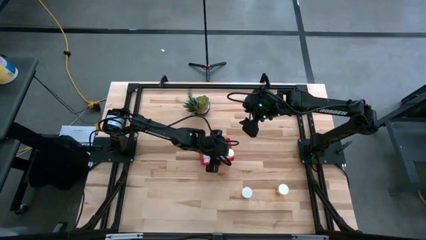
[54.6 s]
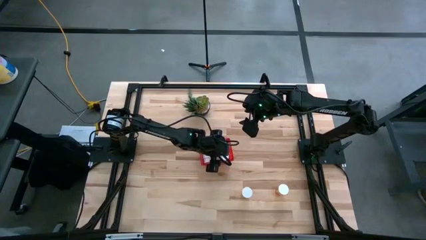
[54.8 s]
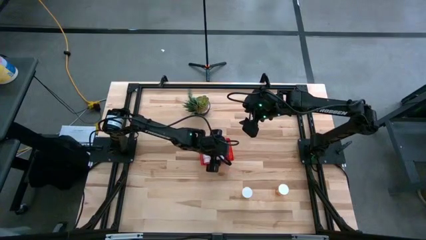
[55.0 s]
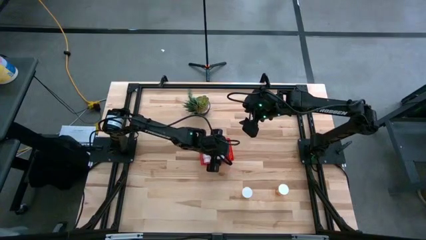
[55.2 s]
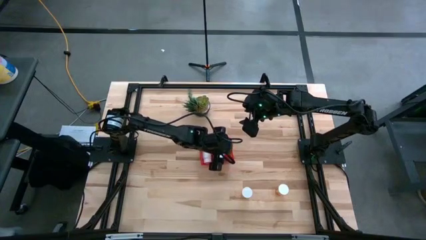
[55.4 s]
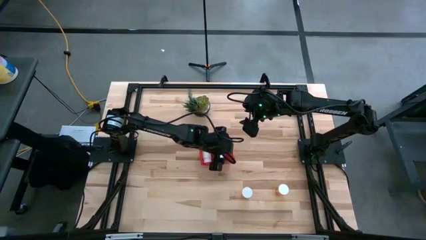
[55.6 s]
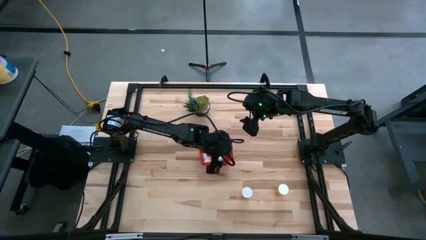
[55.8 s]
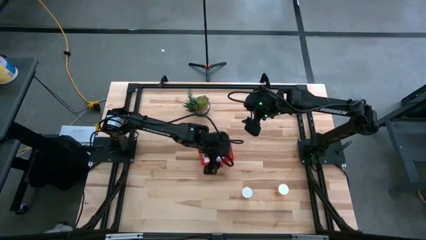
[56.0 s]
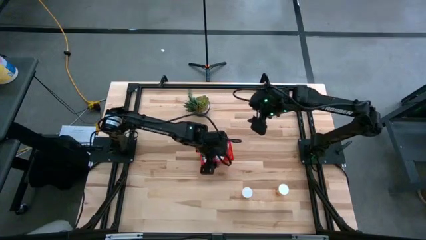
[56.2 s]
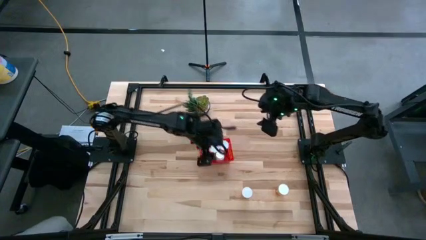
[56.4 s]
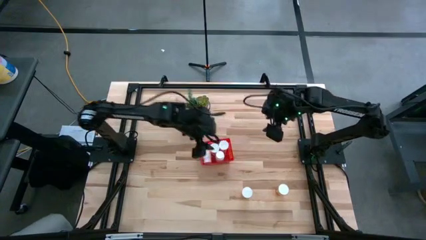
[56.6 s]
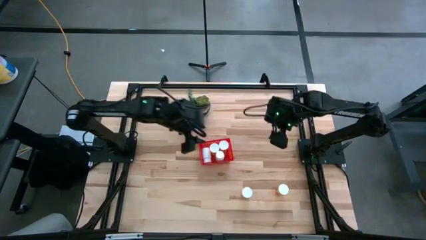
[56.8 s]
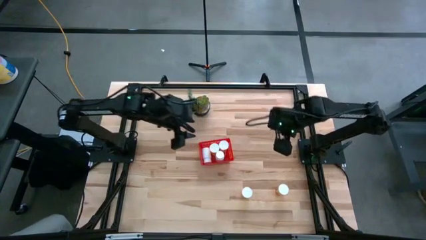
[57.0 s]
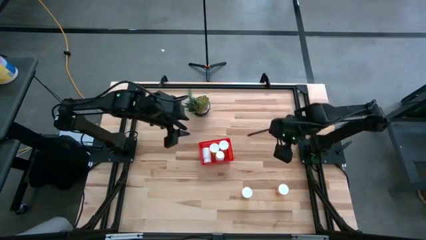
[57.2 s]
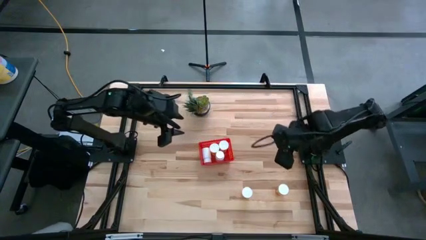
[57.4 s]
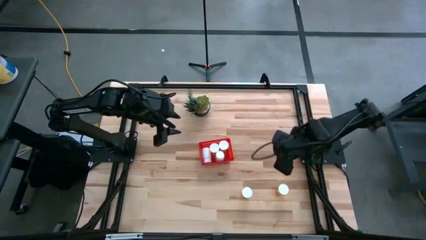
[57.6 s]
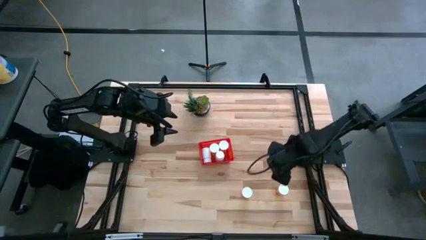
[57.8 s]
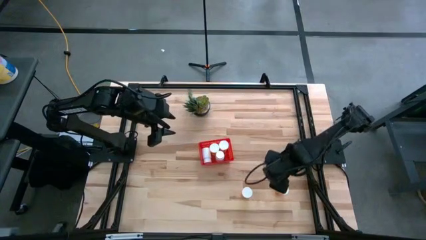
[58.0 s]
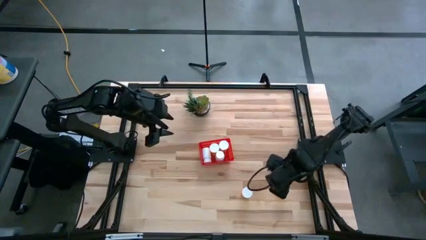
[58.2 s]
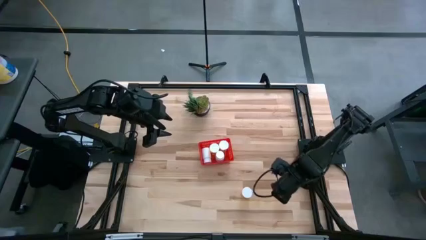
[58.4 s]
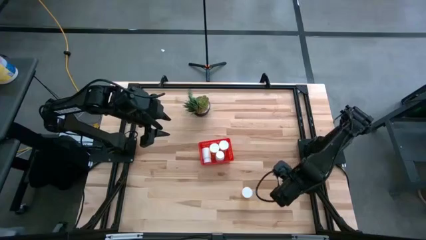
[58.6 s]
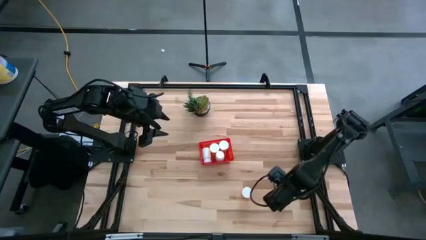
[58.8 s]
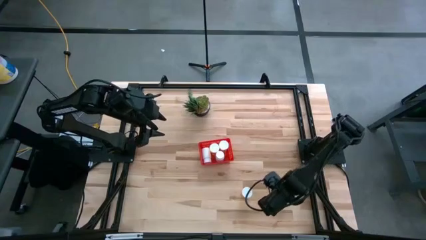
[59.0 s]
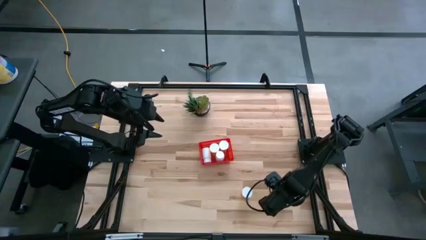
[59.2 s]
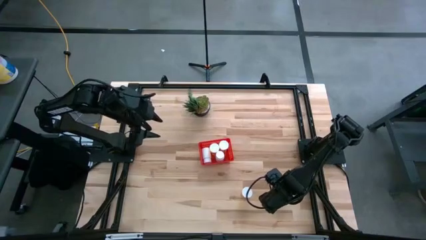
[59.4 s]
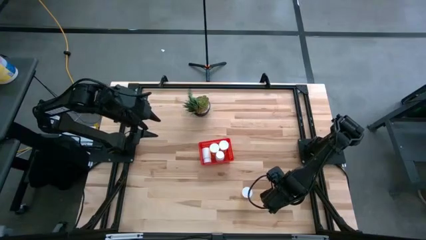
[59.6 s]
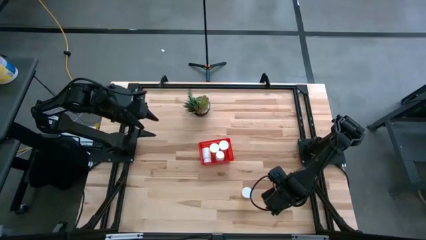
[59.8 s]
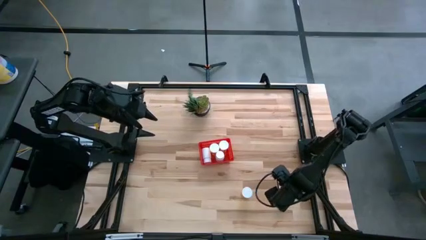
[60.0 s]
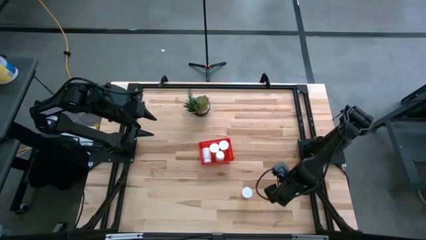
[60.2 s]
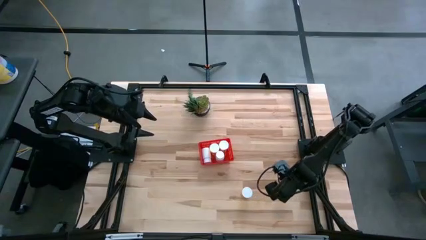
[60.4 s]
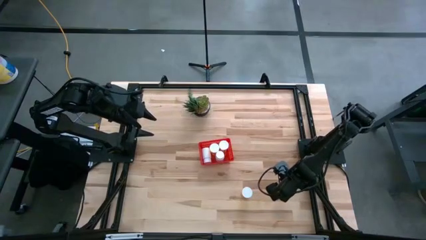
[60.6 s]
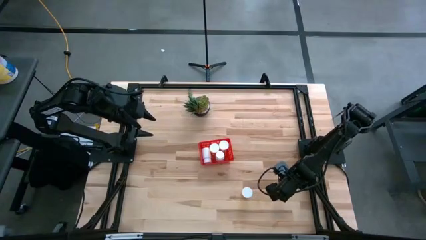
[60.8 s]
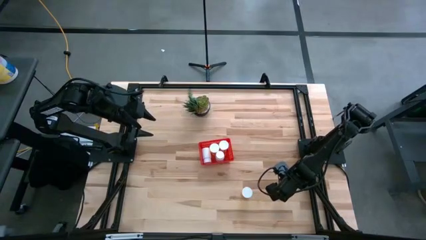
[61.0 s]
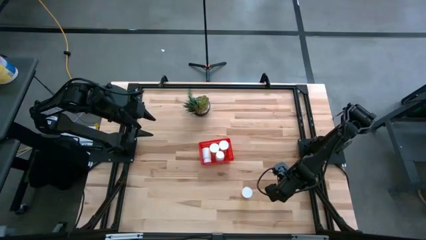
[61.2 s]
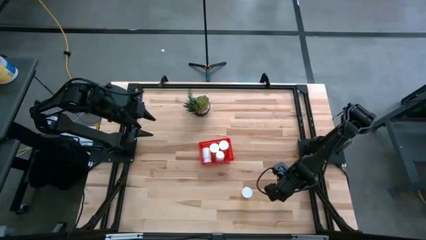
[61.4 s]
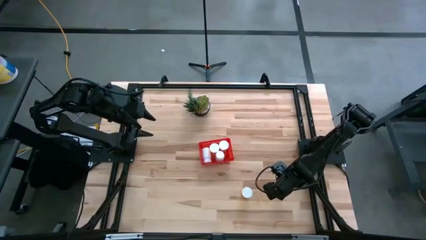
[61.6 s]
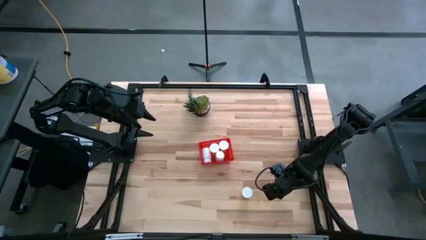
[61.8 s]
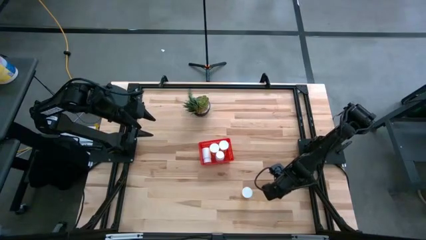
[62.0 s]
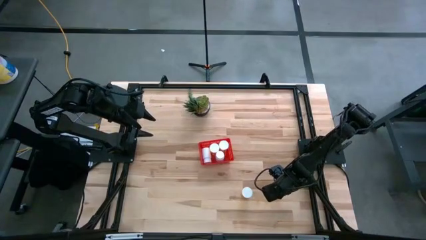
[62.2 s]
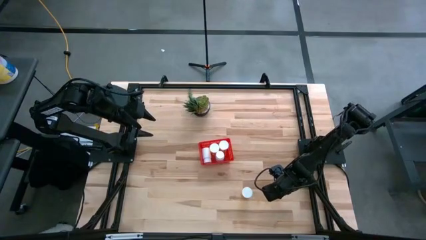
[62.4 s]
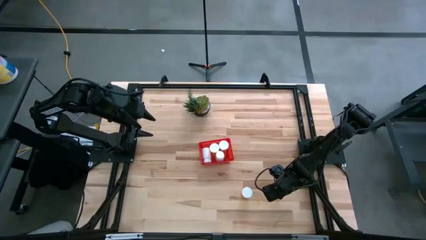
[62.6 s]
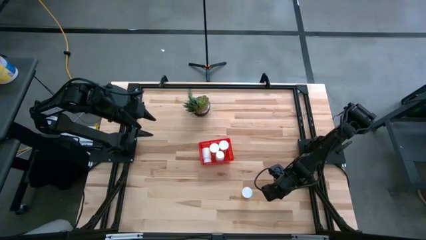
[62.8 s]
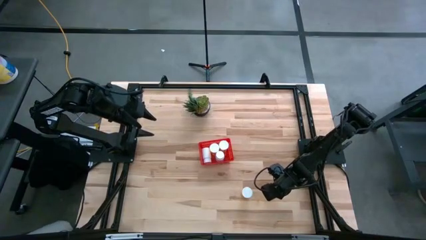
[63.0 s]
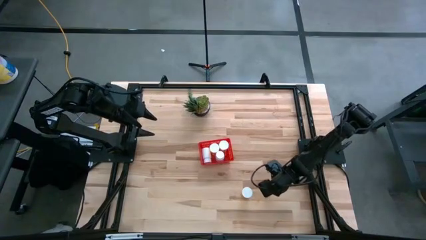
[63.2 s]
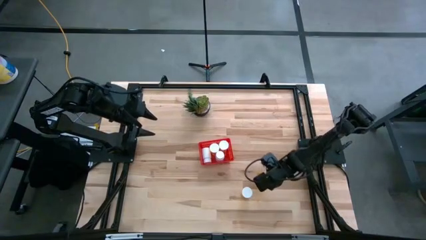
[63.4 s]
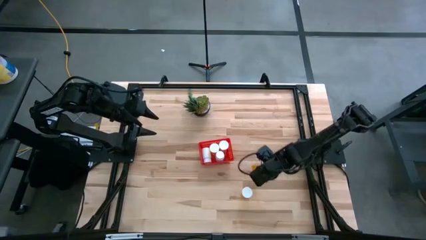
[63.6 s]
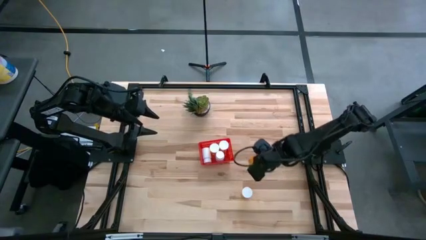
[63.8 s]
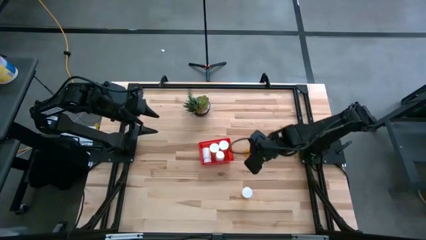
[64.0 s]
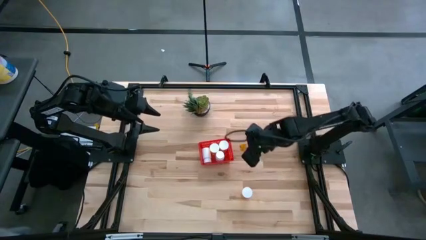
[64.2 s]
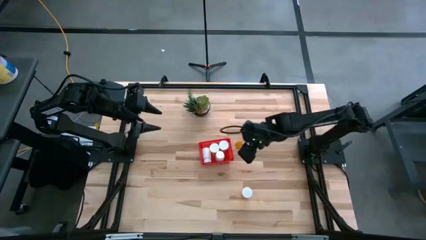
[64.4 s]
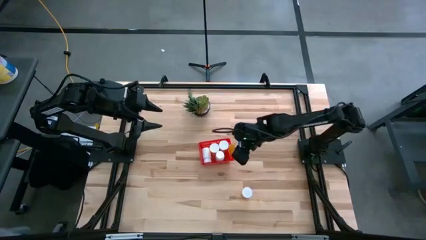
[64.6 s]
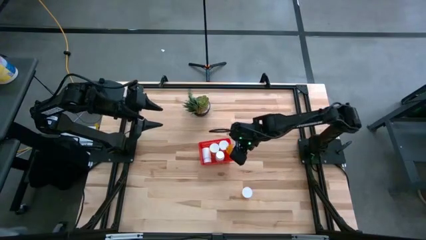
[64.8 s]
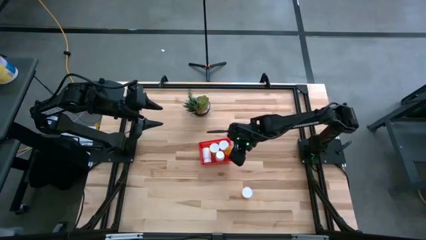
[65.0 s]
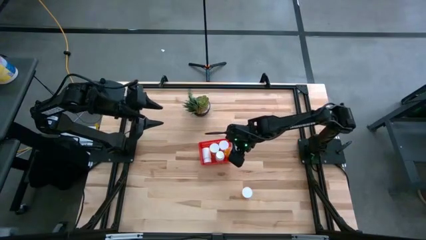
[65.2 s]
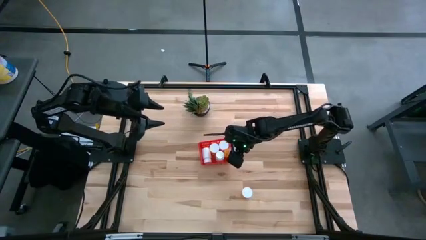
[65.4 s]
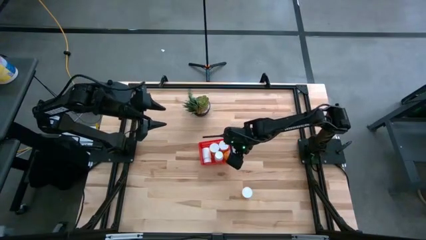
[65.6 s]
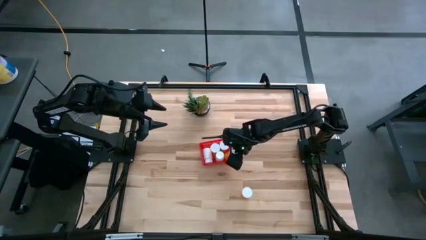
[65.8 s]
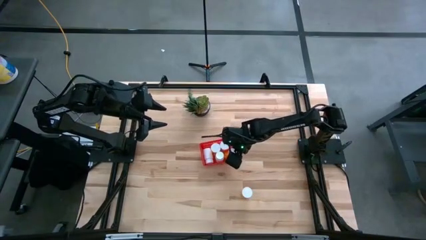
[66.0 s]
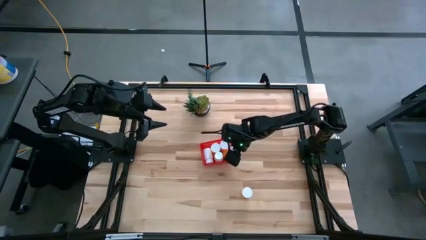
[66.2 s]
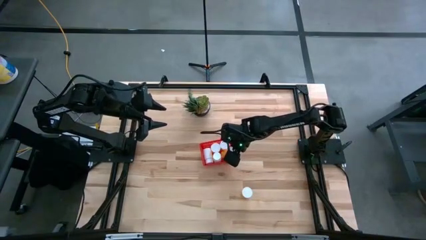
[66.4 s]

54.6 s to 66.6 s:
Task: Pick and place pill bottles into a basket
Put the orange pill bottle into the red bin

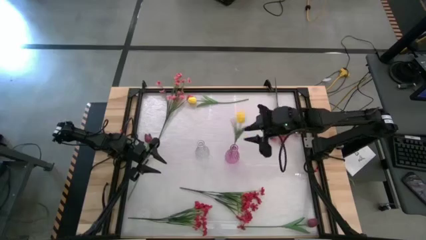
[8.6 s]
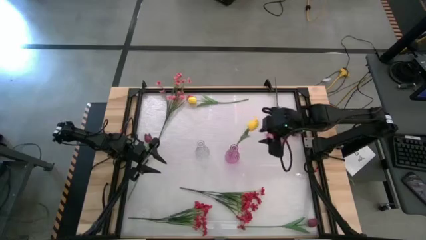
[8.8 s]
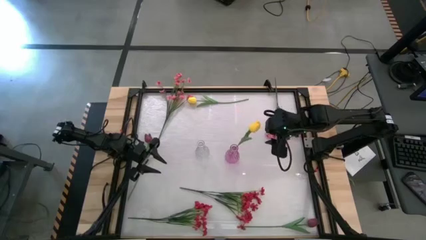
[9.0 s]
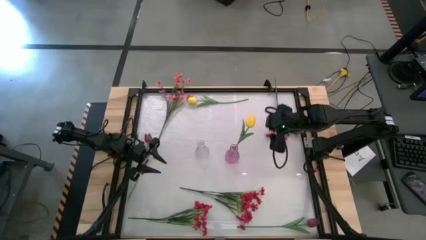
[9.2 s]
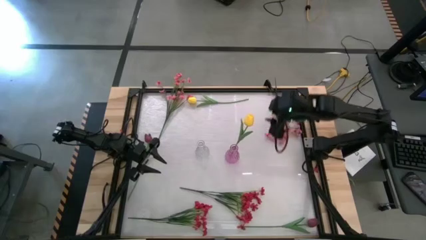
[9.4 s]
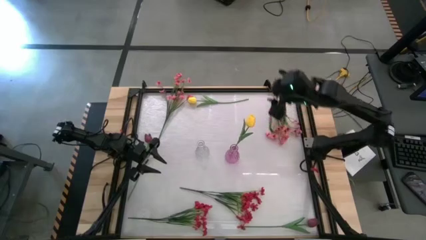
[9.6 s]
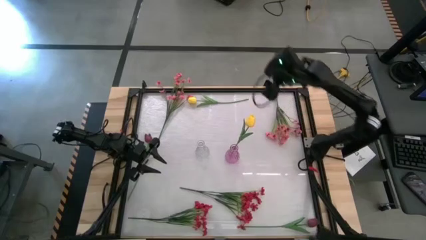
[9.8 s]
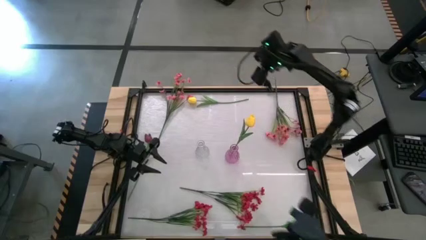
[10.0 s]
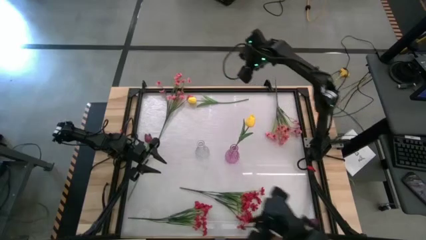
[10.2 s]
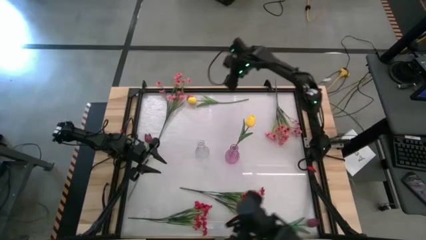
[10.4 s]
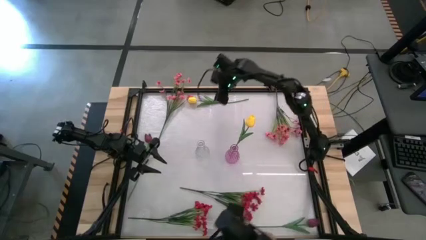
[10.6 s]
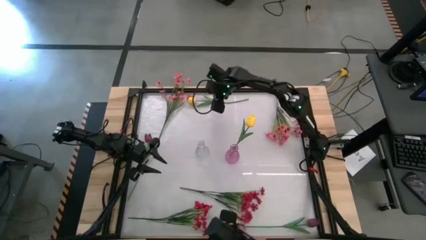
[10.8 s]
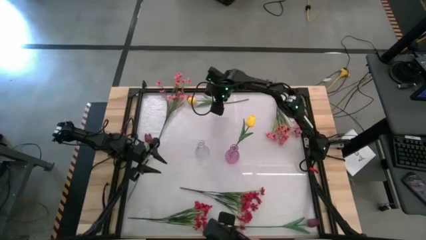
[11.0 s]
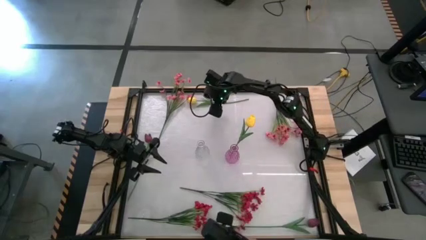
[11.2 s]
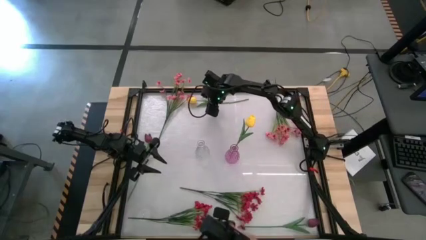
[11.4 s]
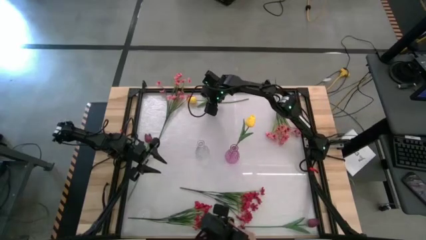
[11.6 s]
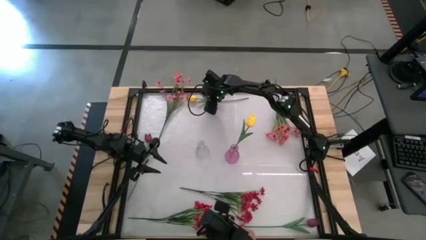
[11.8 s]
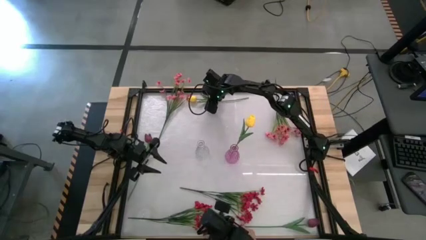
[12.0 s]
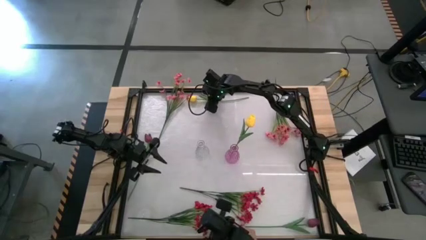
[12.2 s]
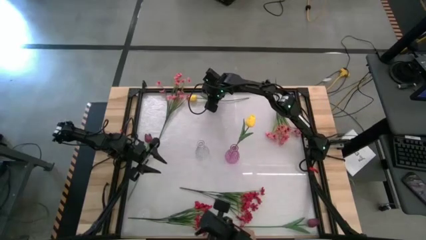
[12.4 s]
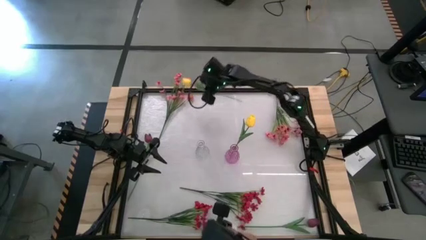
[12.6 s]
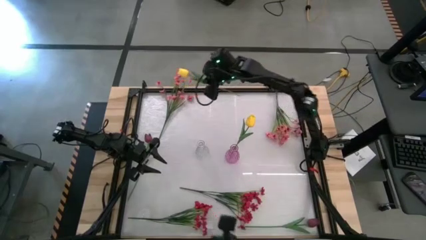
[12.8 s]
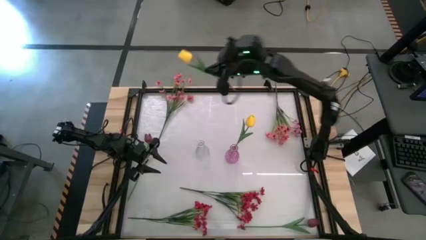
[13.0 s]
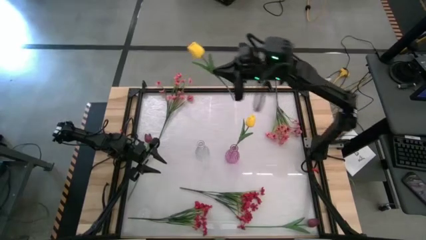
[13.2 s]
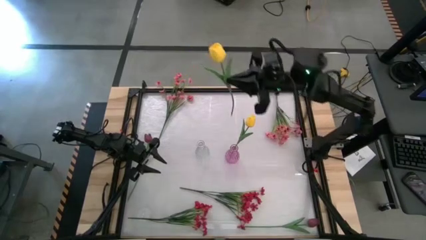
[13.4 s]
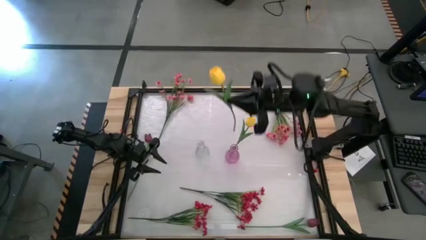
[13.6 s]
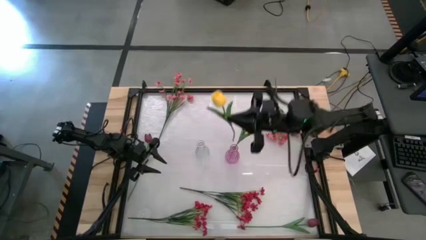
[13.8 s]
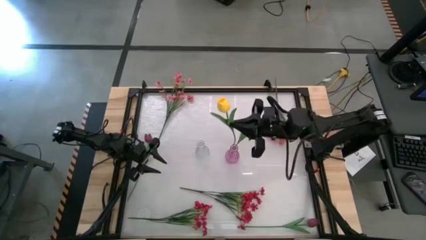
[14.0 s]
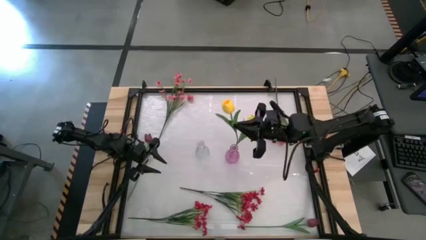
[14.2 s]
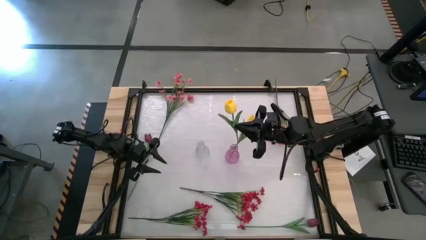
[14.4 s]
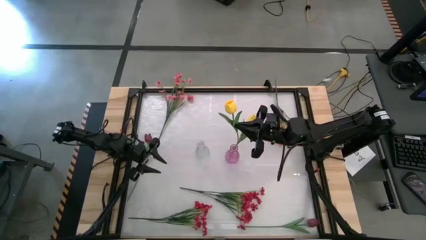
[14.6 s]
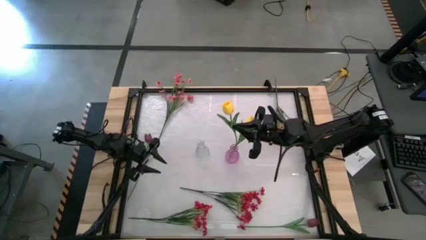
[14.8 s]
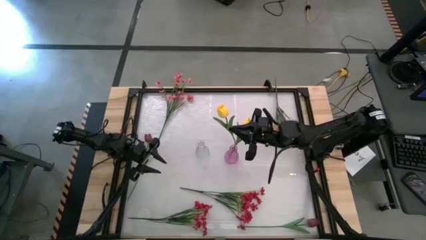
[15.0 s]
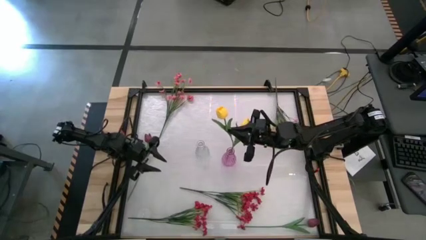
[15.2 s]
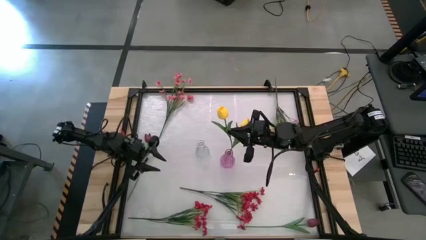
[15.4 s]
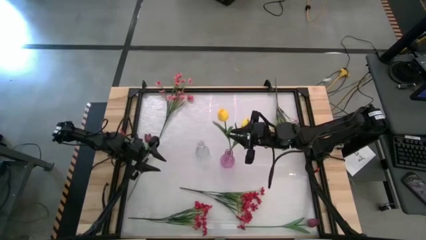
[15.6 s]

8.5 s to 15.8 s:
Task: Sort flowers into vase by color
Put the yellow flower into the purple vase
